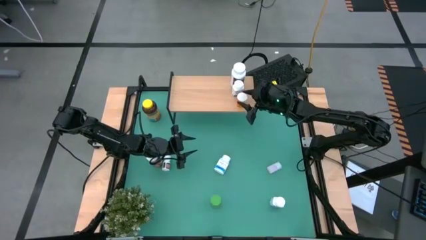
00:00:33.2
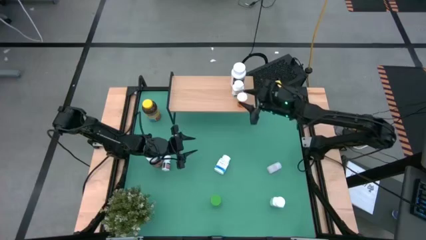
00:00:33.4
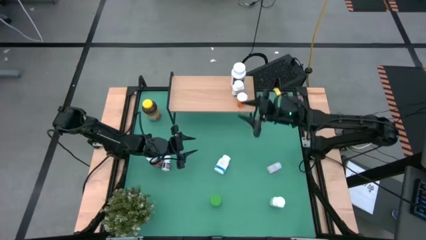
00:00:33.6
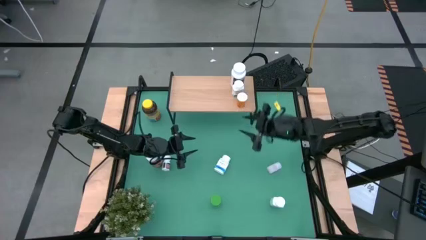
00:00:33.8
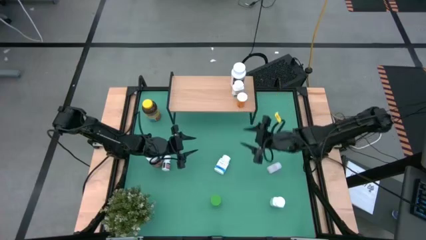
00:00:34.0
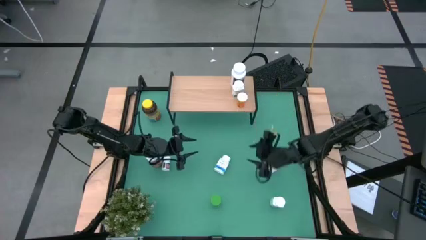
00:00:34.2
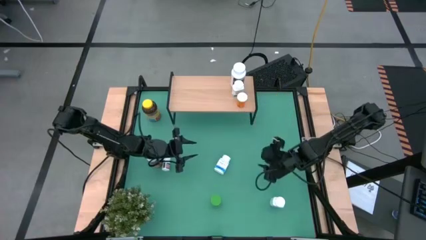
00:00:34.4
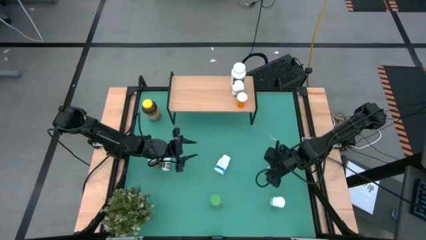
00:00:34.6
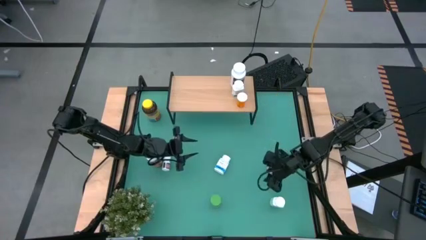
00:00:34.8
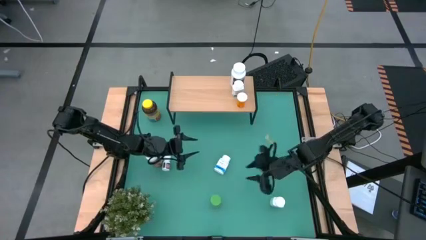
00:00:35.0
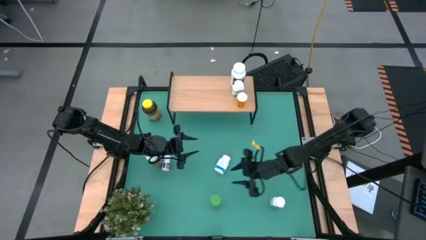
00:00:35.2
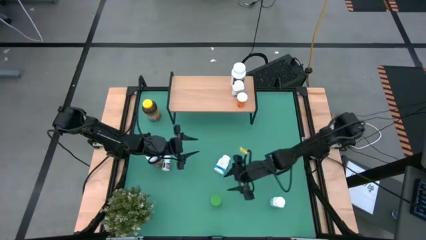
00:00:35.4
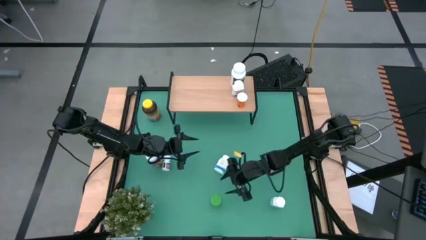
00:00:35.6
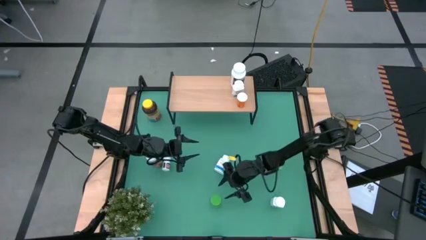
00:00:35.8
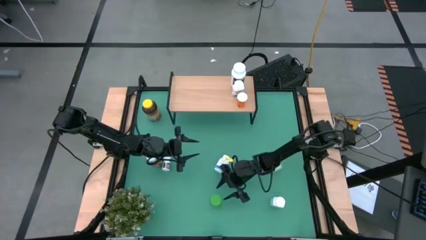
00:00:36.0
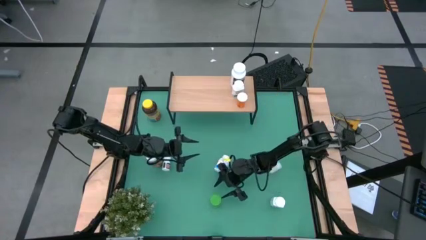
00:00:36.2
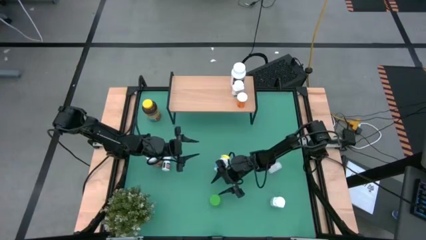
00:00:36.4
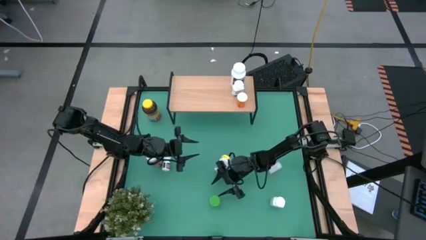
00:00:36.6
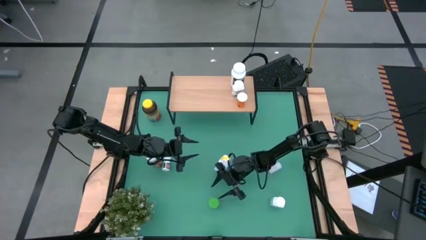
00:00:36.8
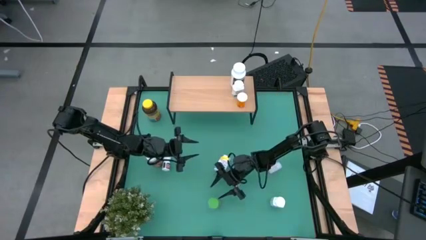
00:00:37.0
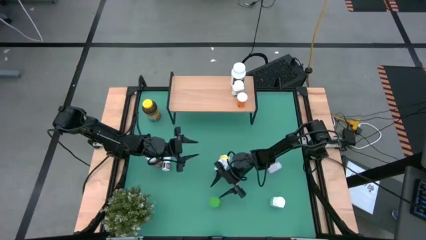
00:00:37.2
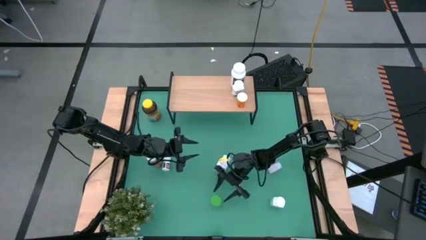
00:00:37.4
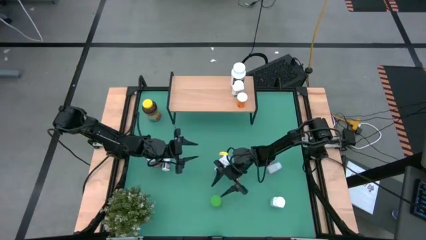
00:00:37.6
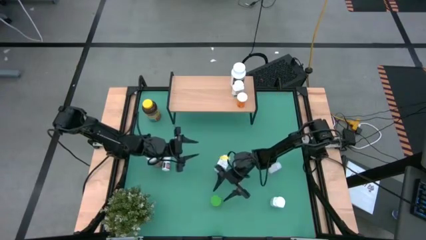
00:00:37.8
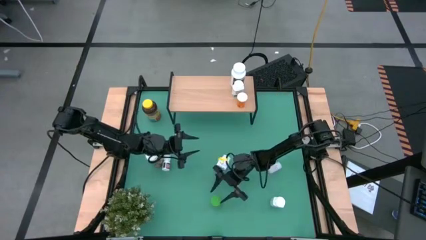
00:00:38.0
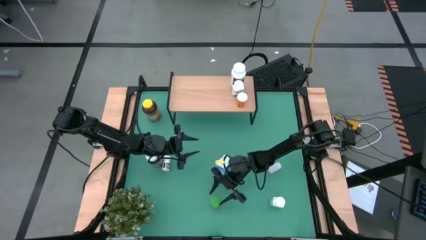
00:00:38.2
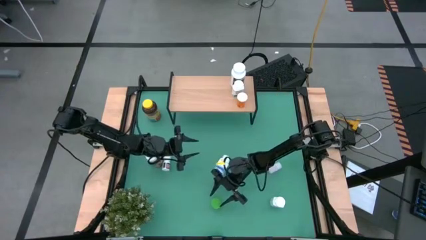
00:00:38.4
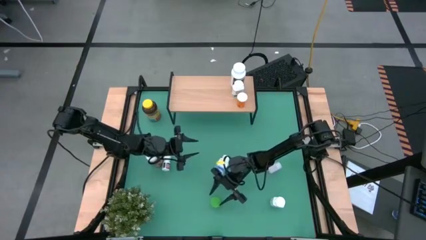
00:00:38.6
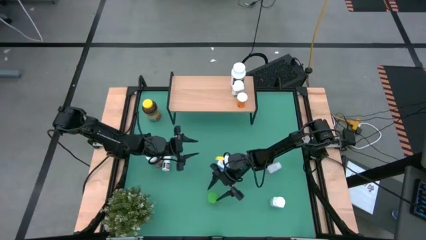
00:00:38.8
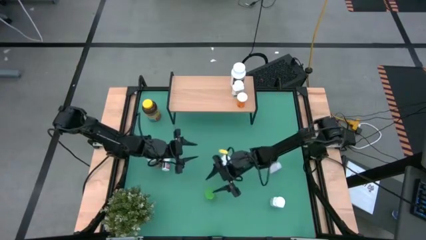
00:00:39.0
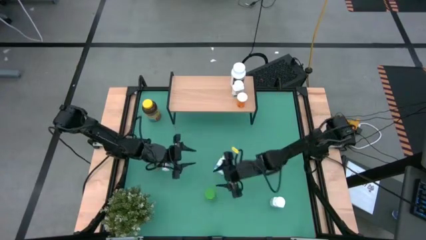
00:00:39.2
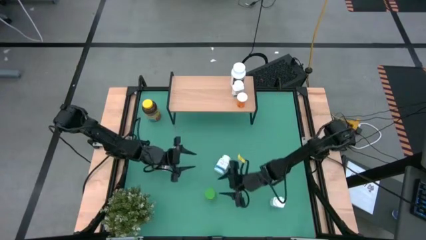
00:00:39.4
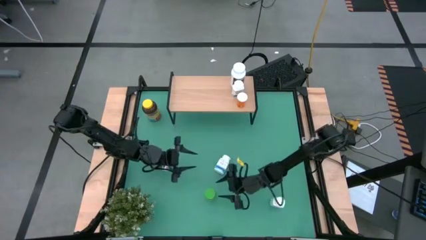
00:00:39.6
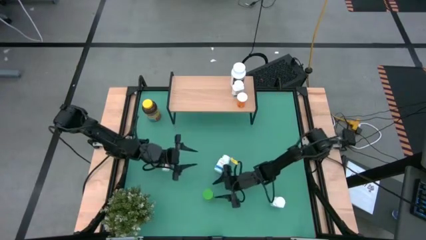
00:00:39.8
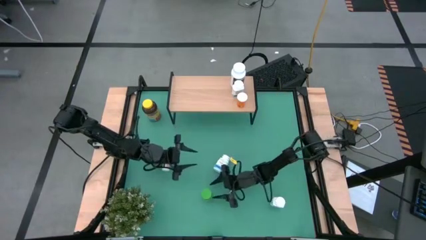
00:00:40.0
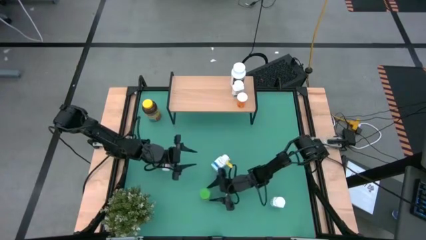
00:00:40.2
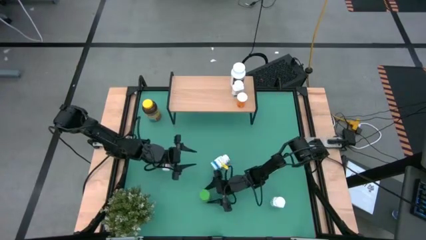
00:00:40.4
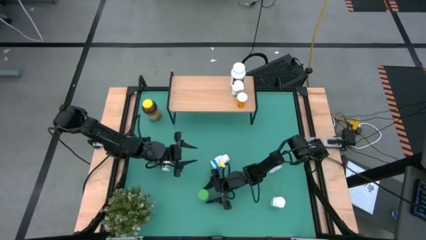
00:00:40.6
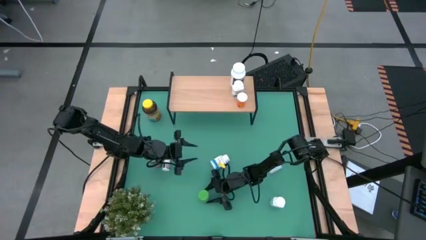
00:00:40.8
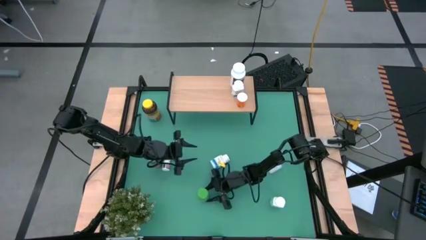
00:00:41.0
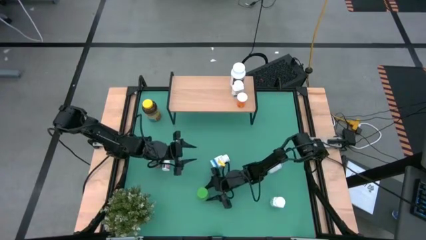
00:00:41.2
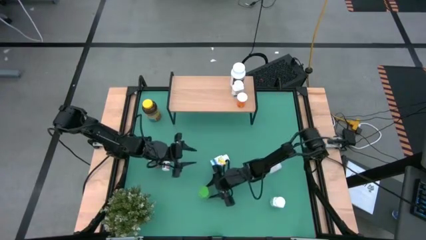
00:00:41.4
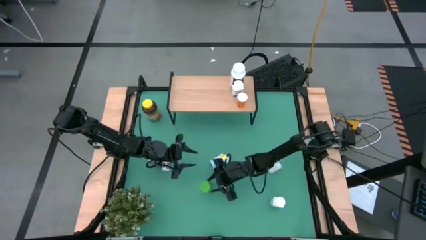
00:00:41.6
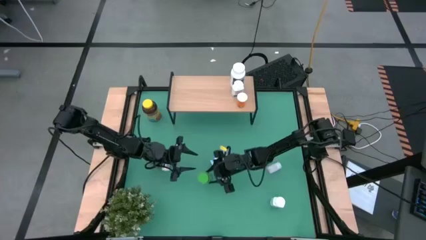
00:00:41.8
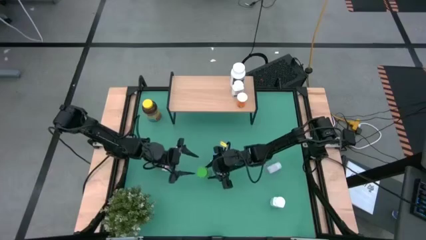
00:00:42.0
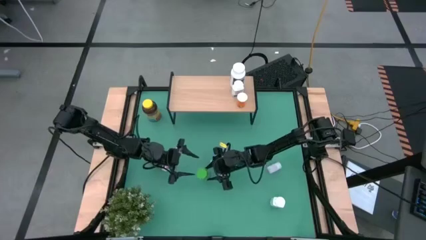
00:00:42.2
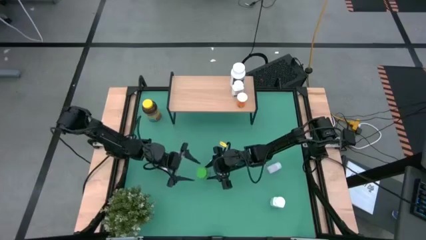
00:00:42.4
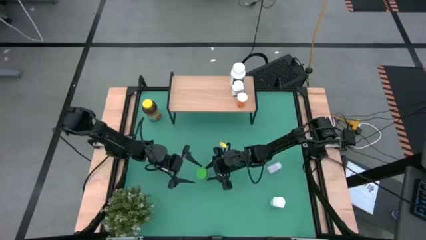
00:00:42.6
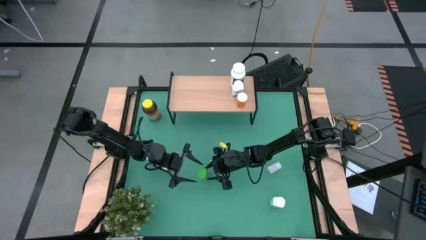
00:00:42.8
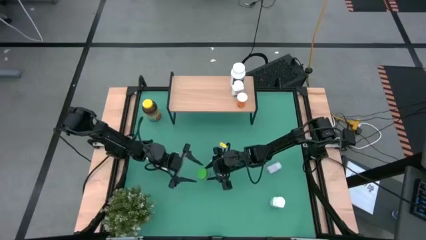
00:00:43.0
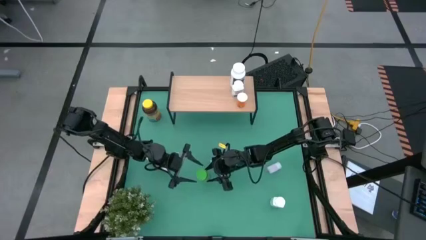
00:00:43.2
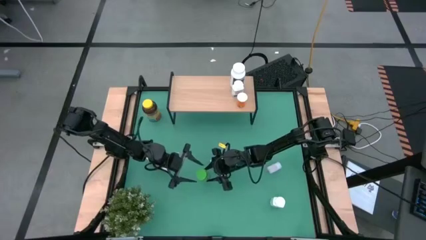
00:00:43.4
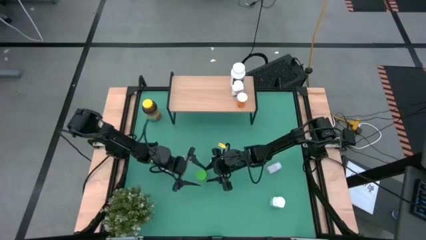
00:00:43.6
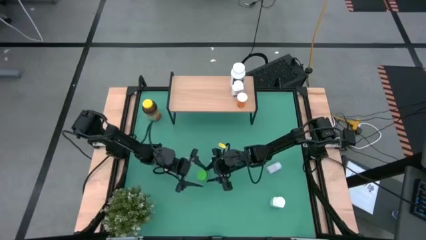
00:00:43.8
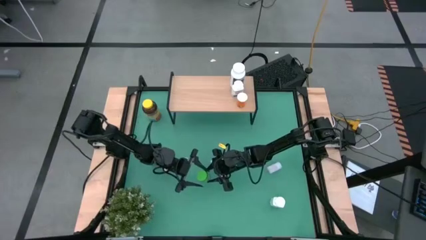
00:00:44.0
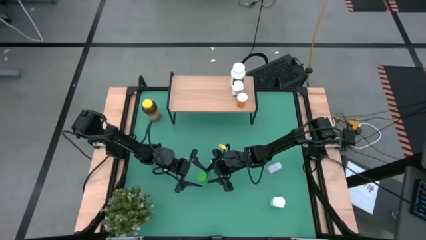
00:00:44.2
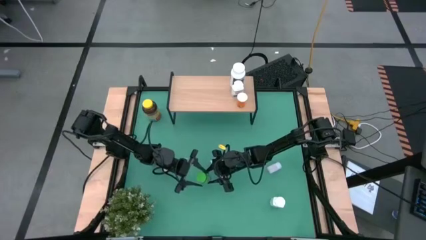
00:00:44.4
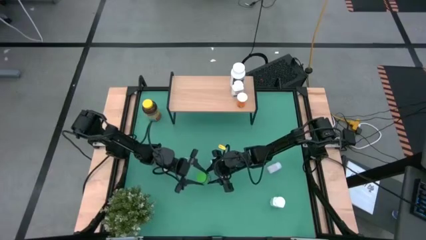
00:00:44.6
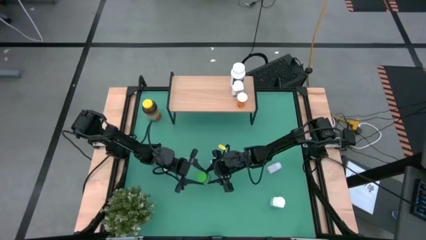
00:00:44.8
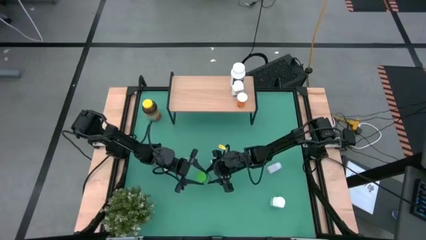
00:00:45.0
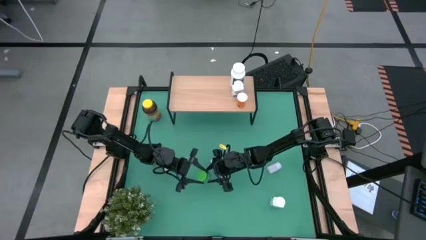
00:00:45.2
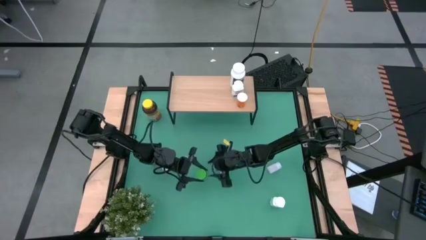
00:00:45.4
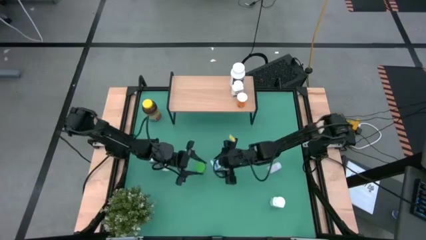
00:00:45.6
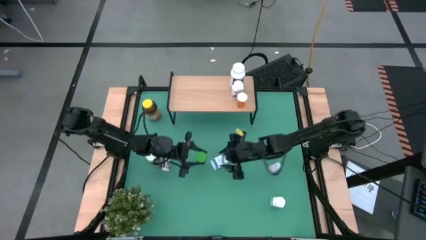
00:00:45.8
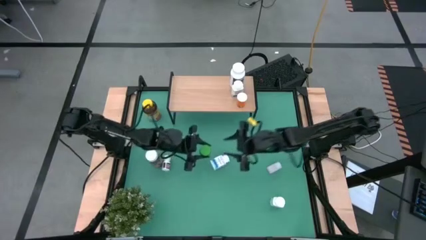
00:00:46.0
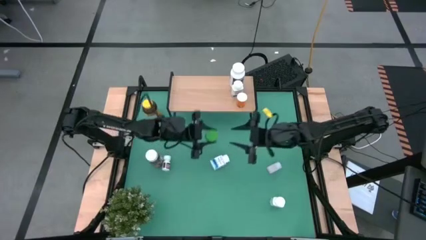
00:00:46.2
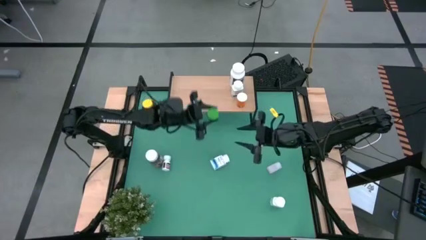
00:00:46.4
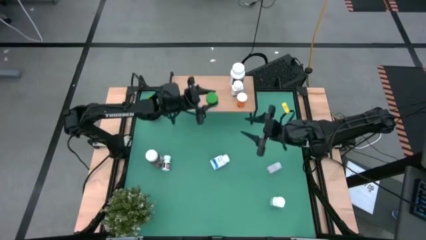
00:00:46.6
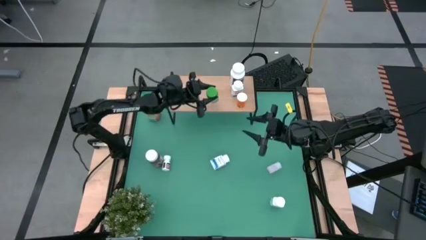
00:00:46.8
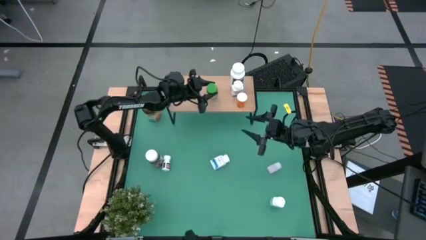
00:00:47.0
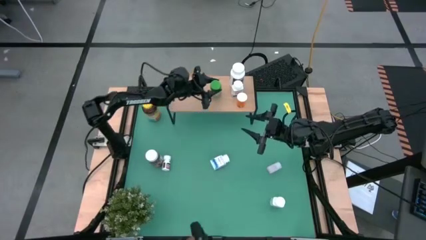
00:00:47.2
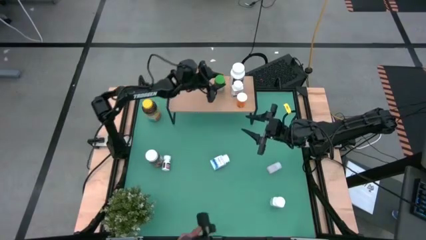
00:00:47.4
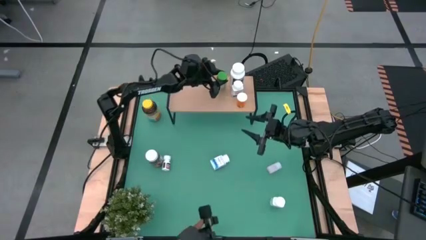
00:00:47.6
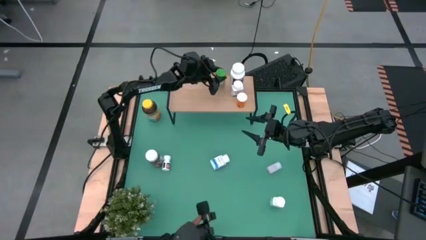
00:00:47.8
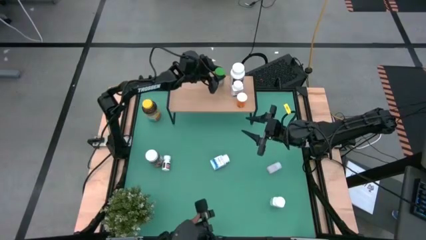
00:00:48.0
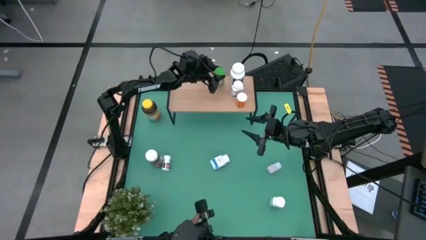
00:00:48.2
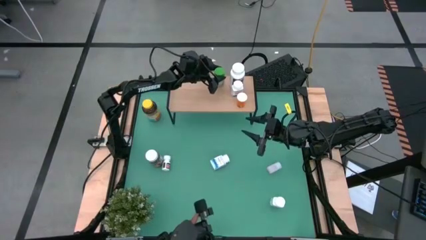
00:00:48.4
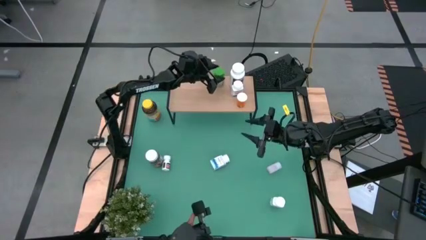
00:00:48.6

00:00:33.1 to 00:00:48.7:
Task: Pick and place medicine bottles onto shelf by color
Put the green medicine bottle on the shelf
